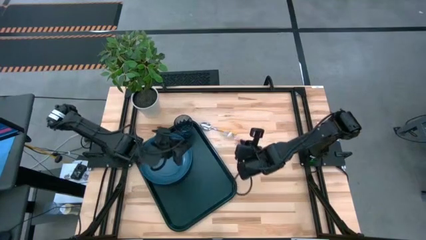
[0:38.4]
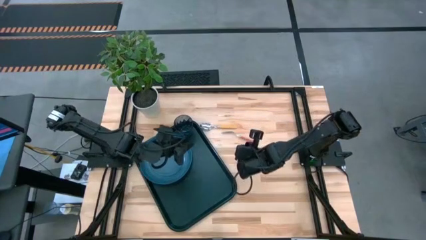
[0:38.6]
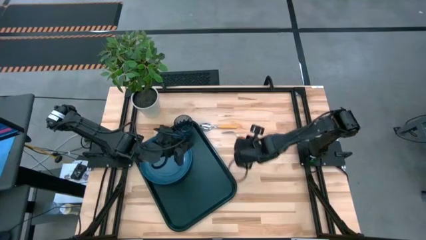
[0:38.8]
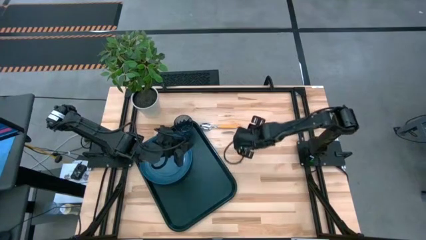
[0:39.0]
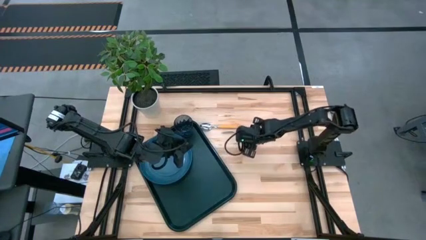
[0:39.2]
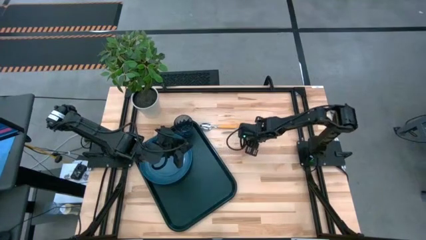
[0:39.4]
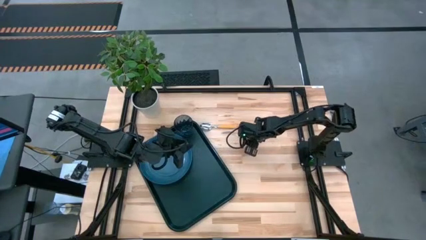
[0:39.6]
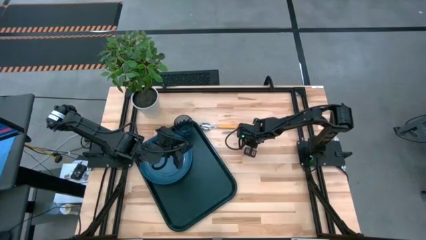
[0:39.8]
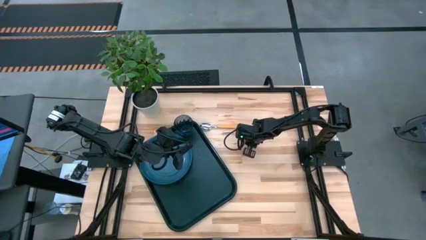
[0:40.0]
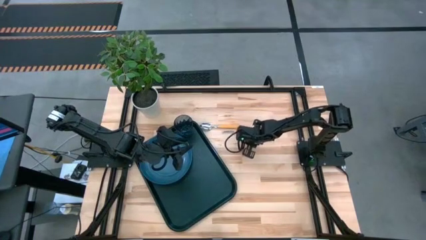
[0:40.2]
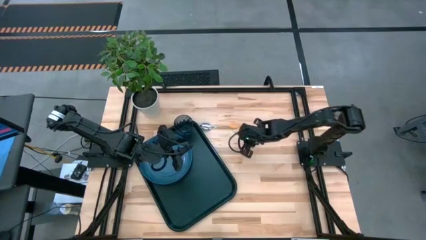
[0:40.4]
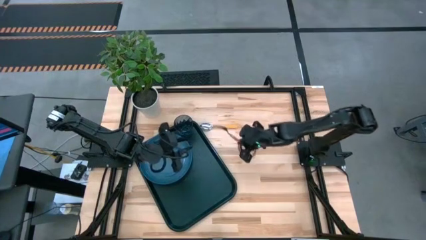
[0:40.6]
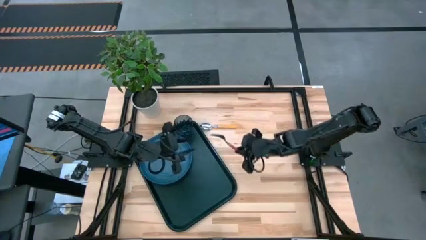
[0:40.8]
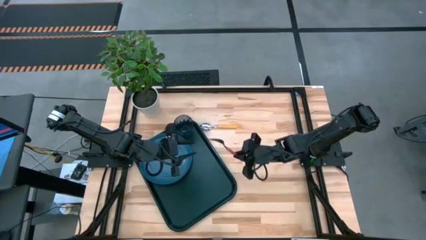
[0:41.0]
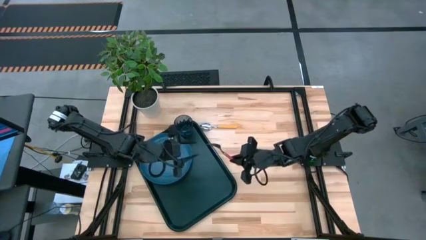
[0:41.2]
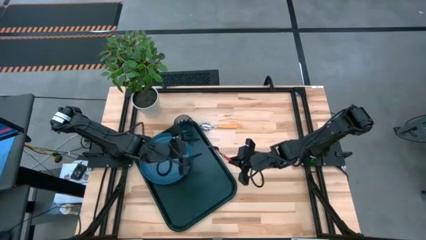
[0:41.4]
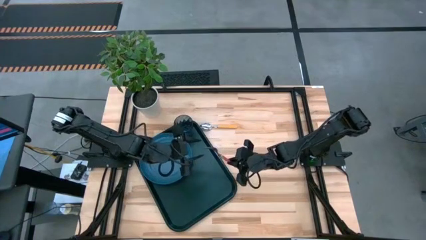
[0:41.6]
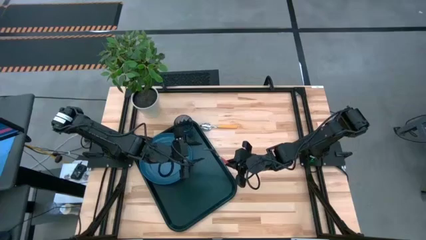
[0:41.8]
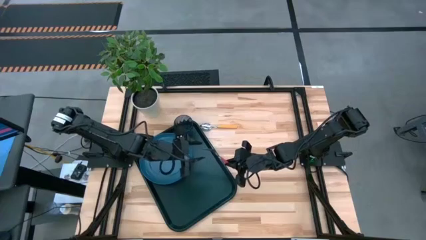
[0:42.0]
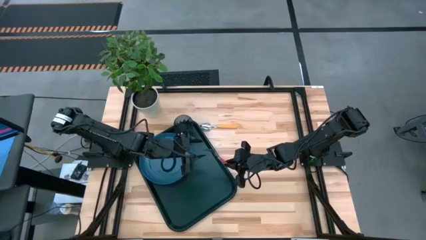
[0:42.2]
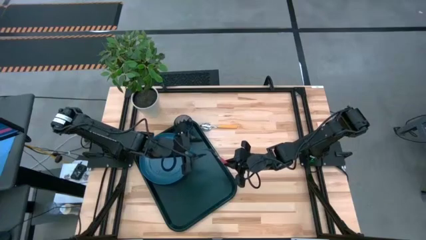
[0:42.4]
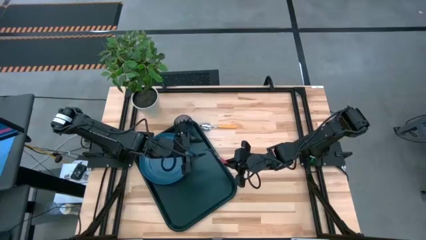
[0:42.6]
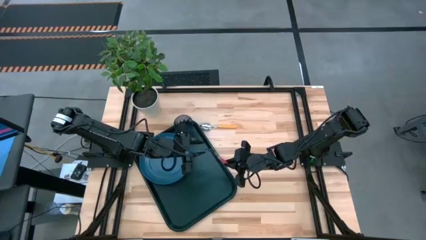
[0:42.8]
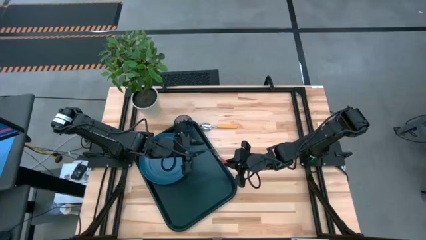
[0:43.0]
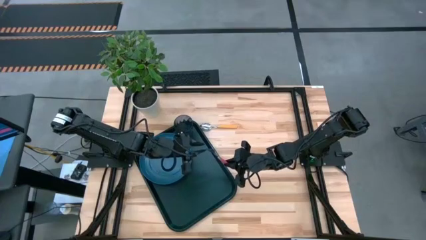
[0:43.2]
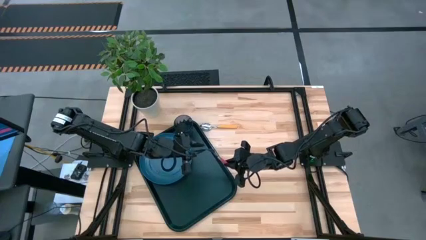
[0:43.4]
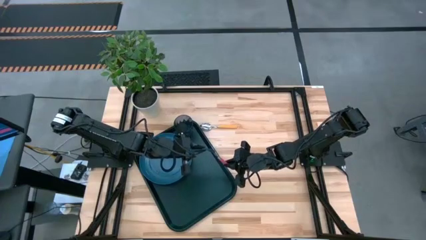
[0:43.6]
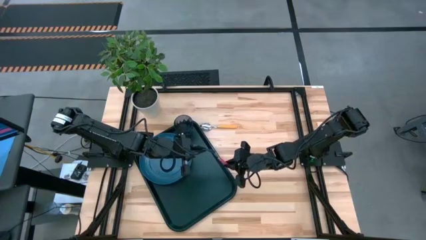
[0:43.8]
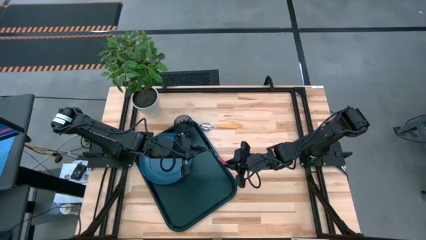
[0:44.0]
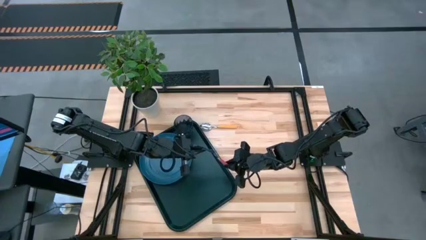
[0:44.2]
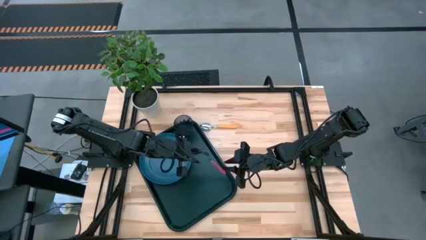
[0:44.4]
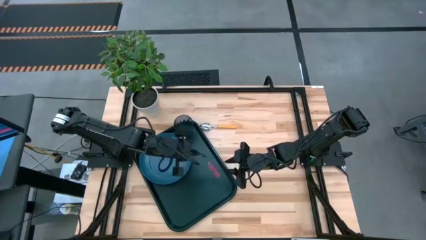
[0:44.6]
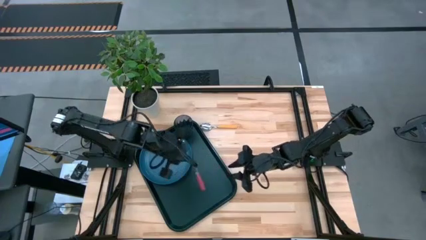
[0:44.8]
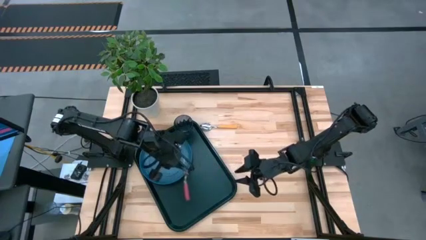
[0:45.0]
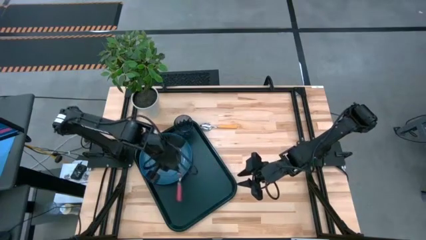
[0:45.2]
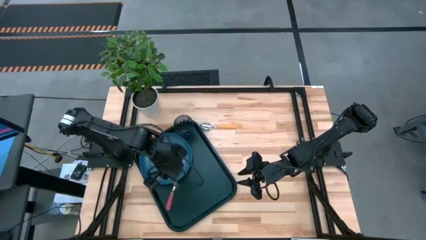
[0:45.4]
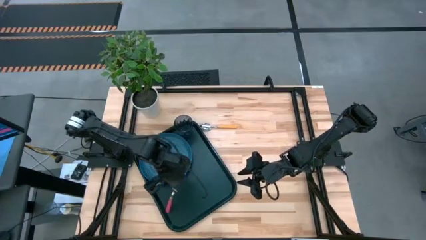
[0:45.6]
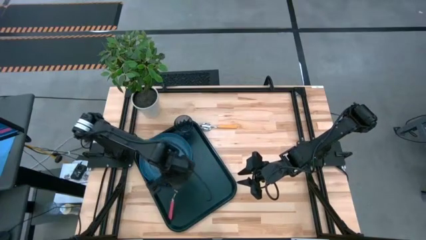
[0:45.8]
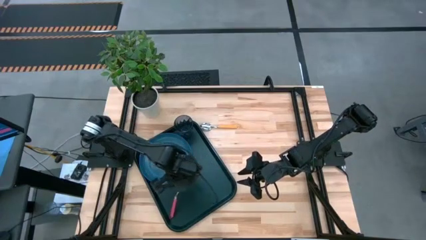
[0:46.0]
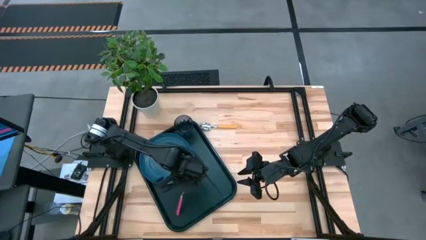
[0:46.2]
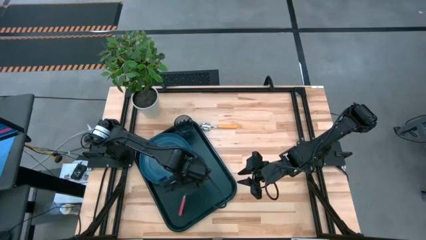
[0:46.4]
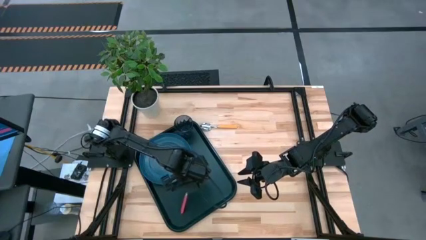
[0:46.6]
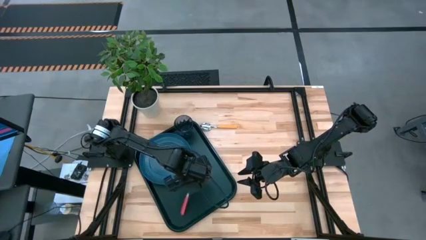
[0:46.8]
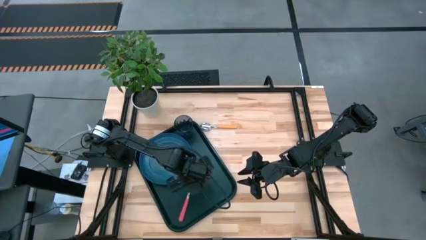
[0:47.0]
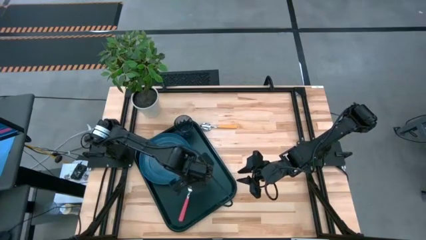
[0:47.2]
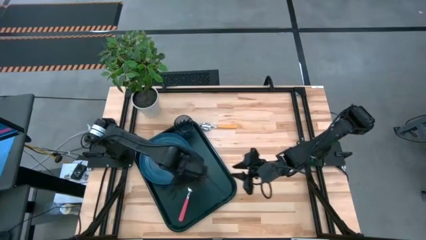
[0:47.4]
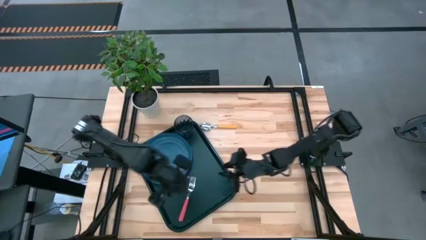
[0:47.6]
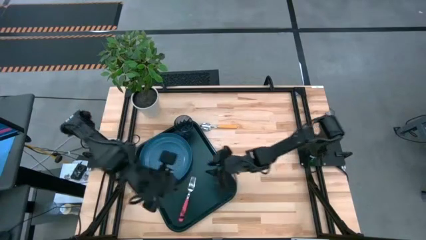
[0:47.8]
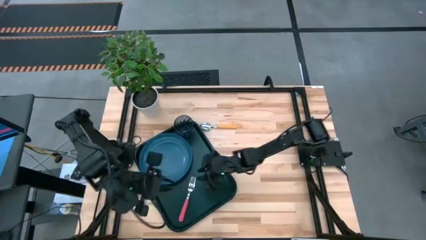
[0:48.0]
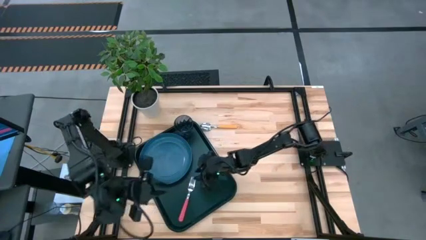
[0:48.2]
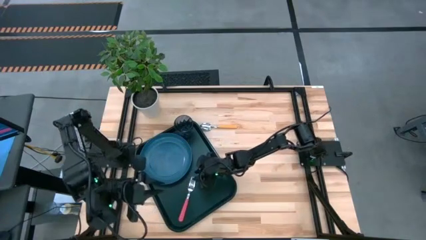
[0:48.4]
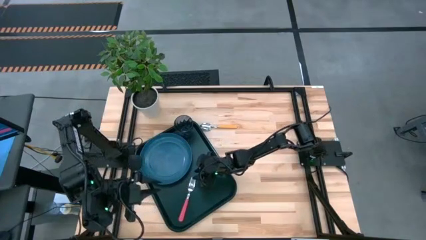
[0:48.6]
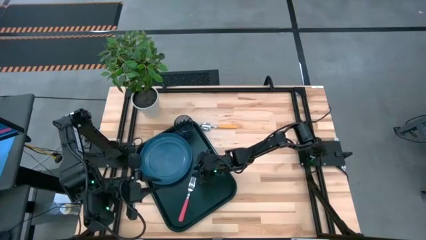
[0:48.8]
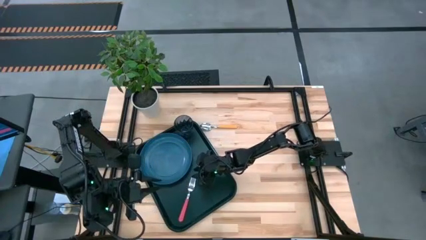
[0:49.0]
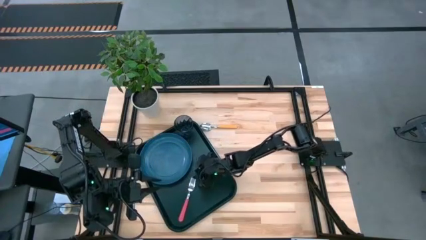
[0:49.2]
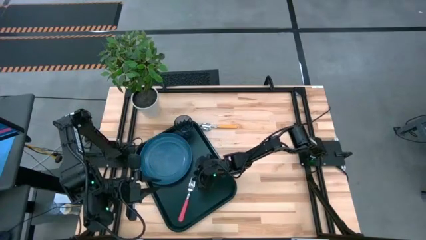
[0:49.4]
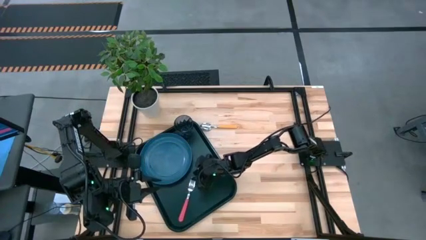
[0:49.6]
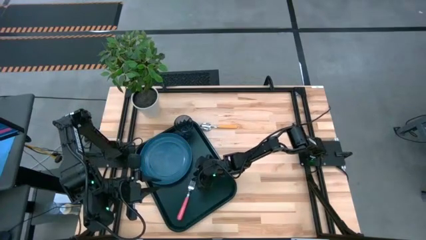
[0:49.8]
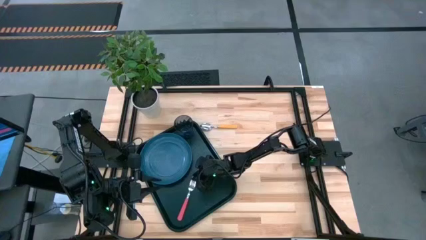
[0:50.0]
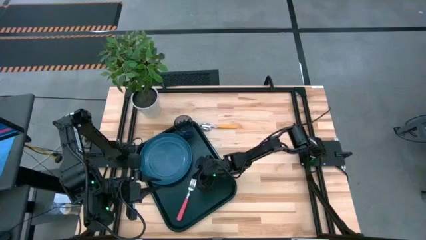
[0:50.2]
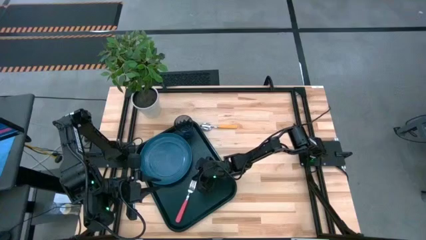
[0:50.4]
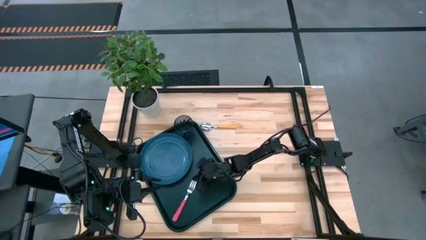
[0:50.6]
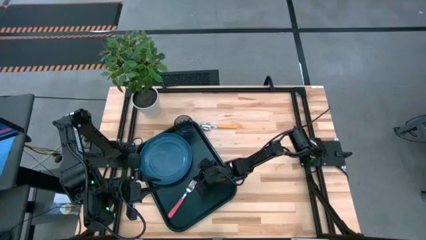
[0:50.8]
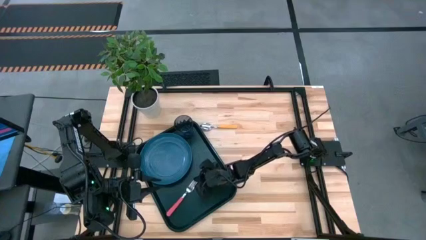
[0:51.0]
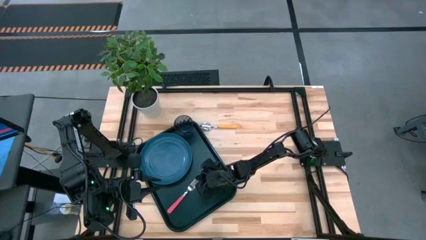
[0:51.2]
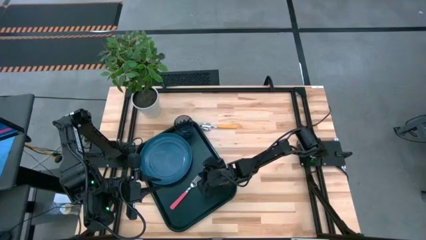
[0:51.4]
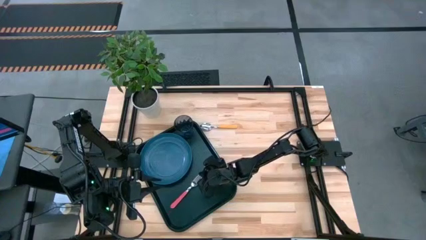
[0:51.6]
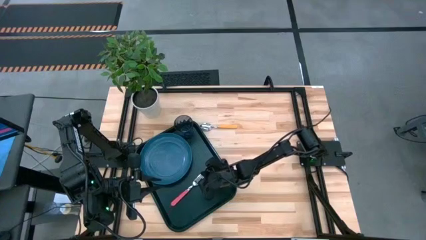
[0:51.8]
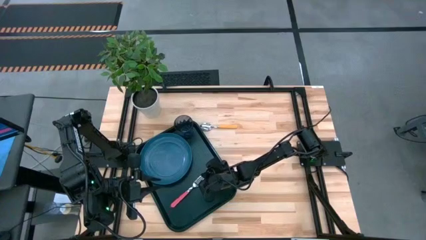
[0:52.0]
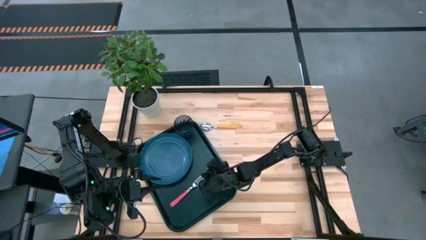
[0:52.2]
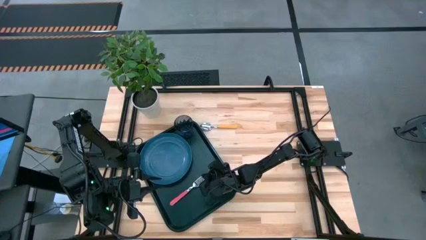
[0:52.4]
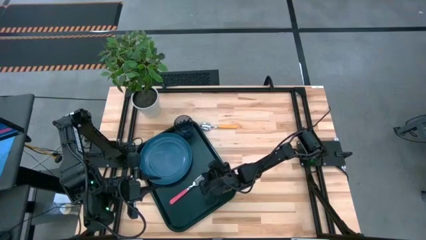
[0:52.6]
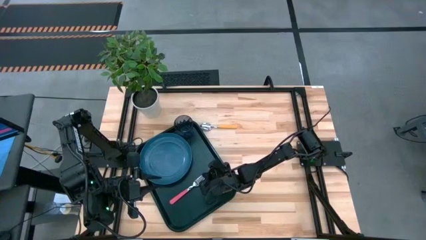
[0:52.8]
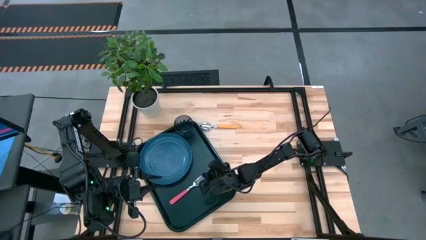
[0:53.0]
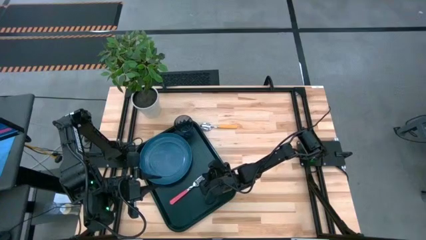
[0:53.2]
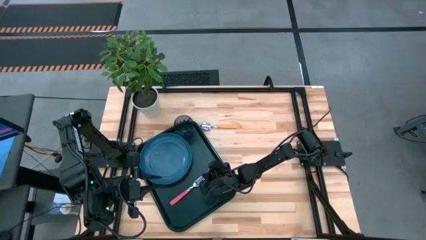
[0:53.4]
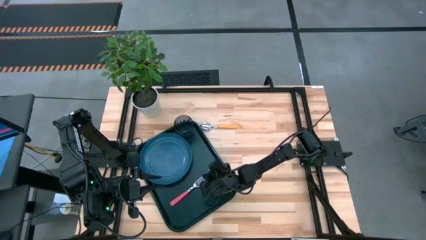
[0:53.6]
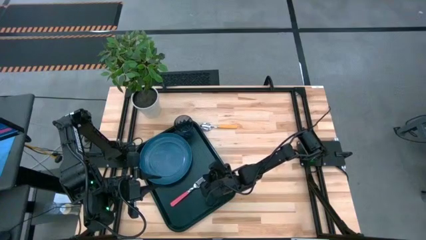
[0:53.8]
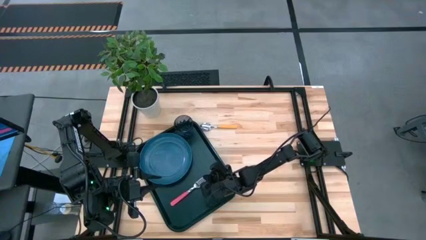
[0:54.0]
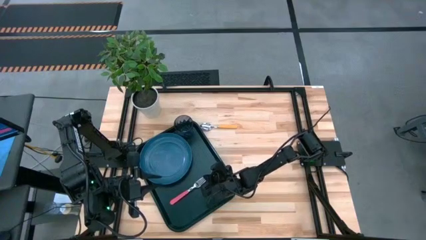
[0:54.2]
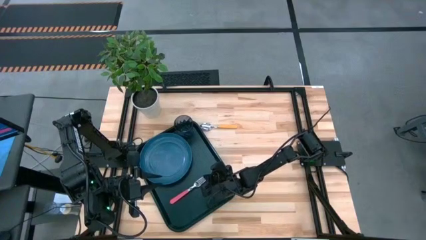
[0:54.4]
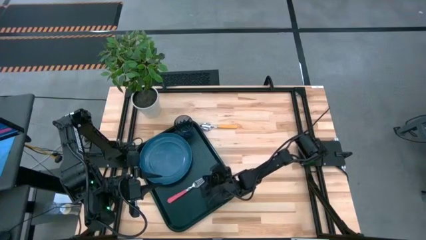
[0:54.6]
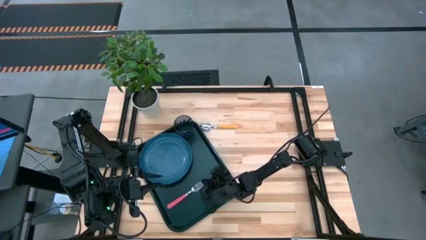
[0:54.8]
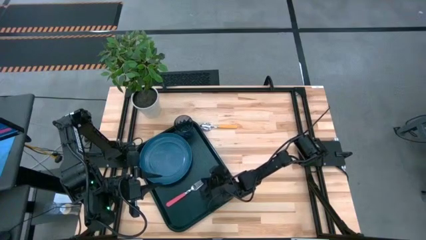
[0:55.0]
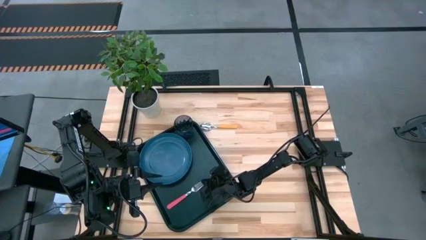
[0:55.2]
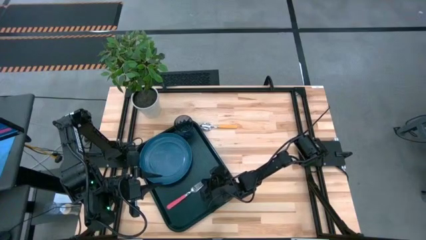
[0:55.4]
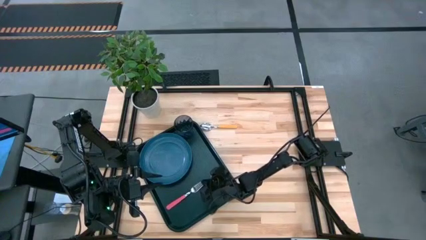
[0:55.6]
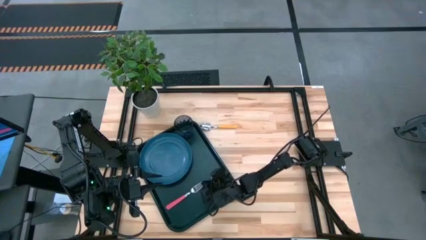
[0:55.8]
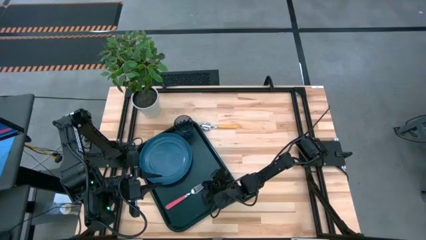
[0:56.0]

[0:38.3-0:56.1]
Task: Pick and place plate/cup/fork/spoon on tray
Put the pink fork on the black tray on the right of the pink plate
